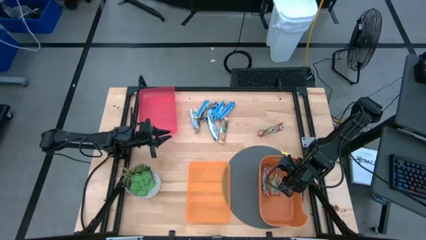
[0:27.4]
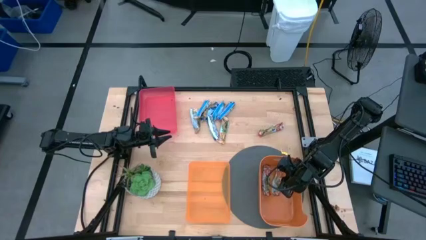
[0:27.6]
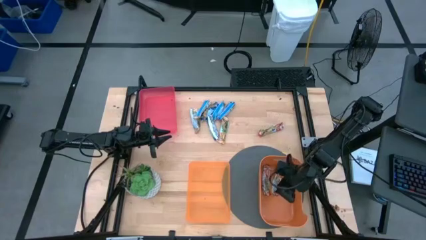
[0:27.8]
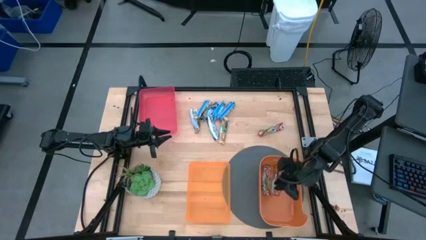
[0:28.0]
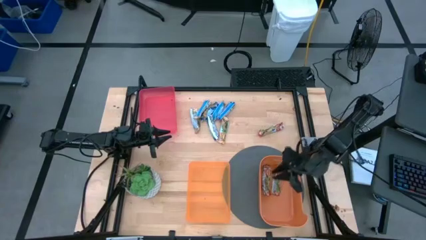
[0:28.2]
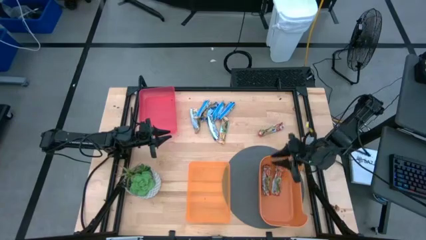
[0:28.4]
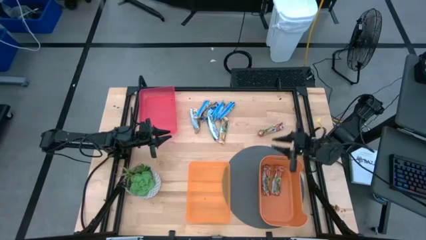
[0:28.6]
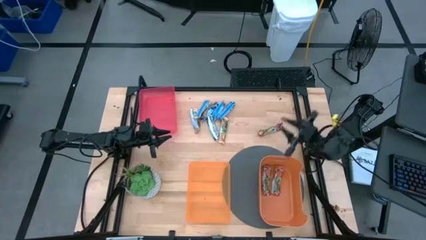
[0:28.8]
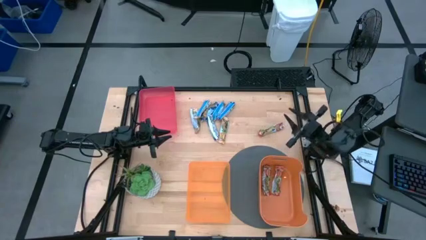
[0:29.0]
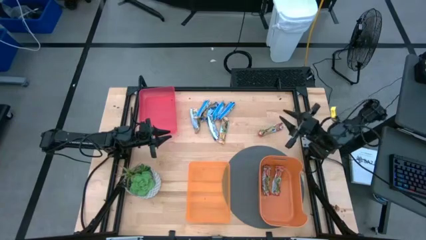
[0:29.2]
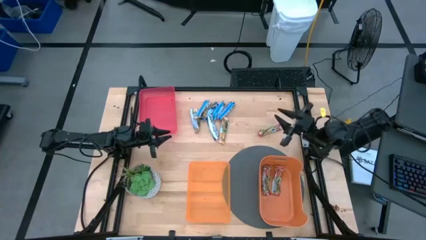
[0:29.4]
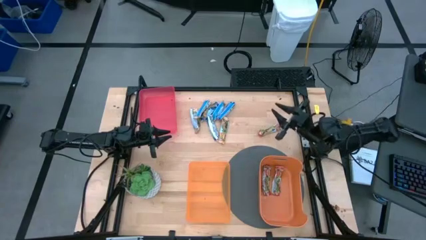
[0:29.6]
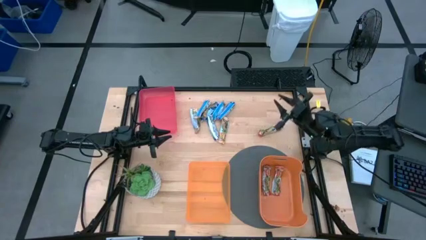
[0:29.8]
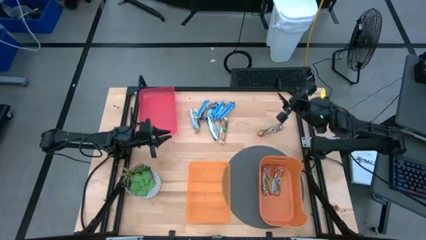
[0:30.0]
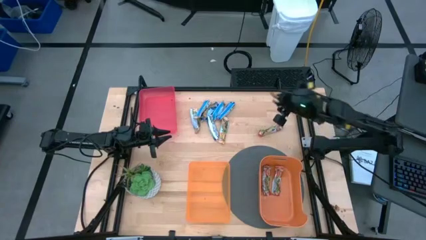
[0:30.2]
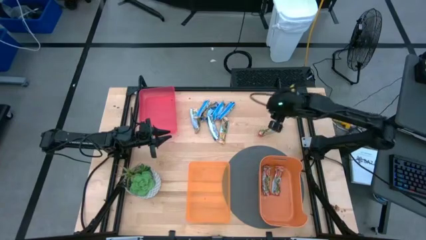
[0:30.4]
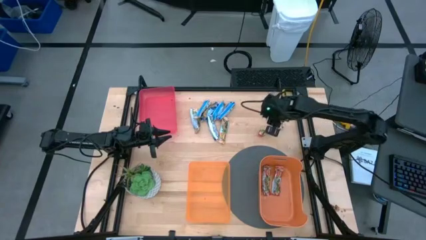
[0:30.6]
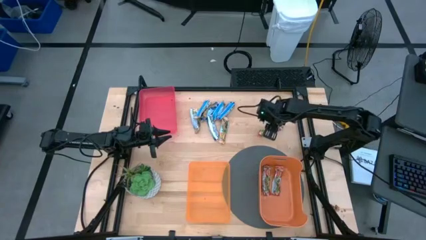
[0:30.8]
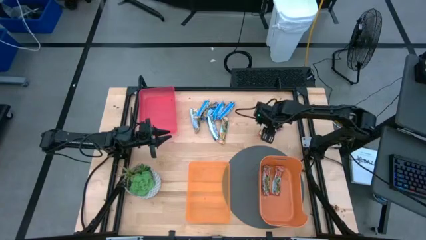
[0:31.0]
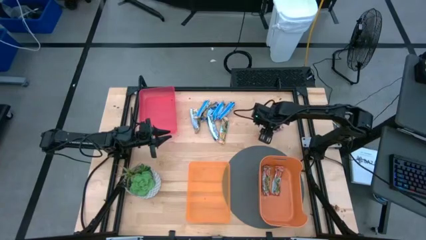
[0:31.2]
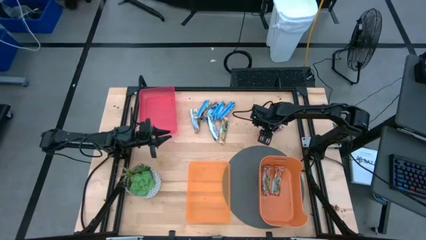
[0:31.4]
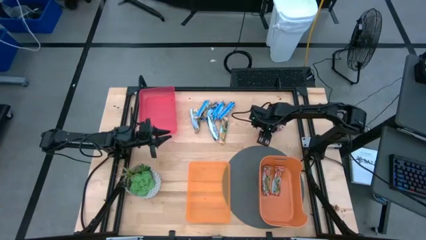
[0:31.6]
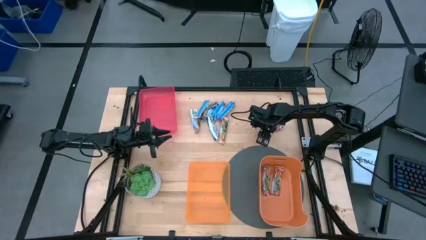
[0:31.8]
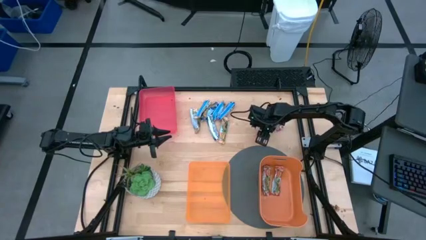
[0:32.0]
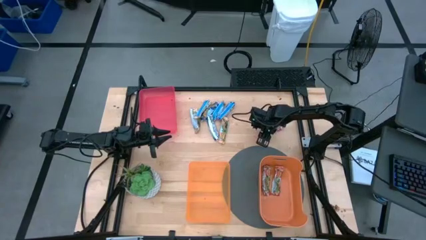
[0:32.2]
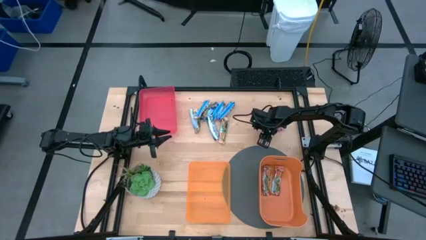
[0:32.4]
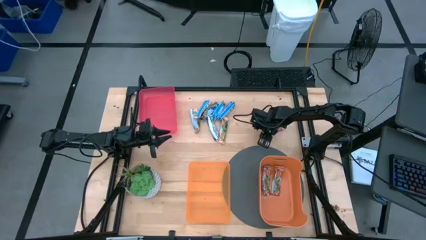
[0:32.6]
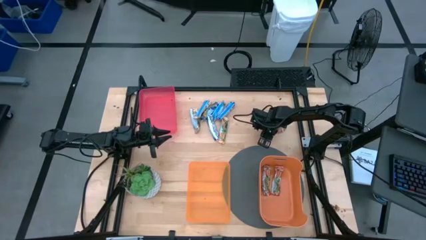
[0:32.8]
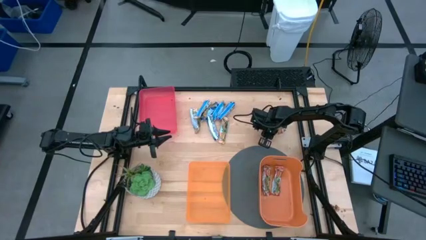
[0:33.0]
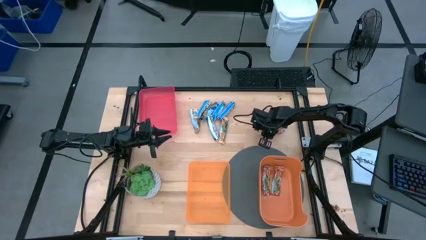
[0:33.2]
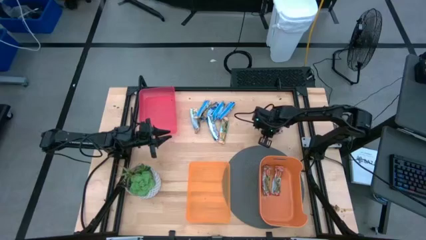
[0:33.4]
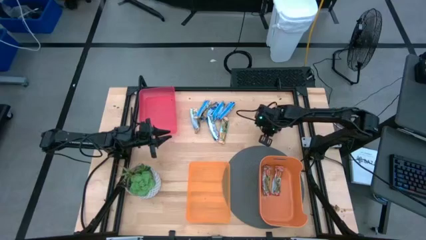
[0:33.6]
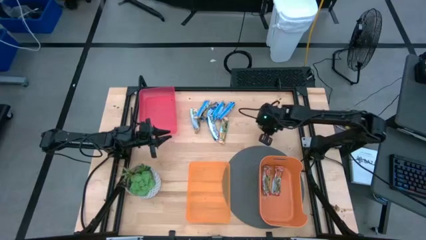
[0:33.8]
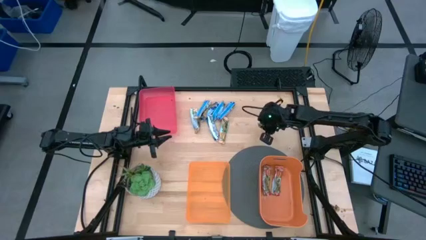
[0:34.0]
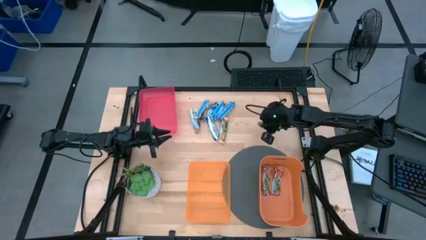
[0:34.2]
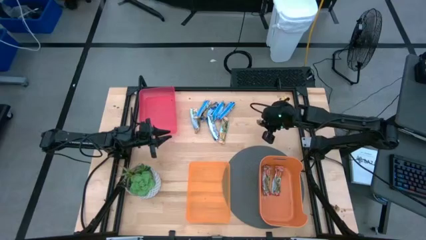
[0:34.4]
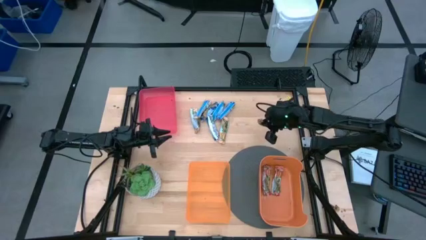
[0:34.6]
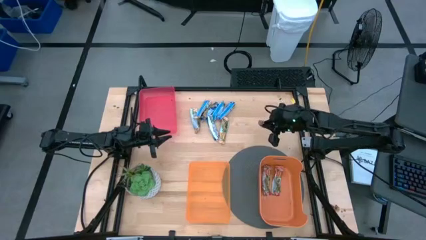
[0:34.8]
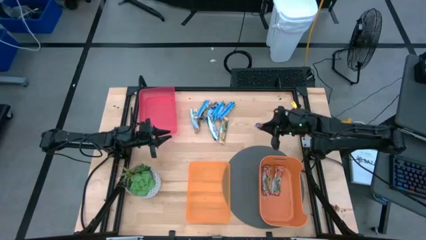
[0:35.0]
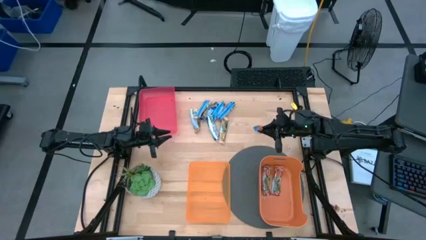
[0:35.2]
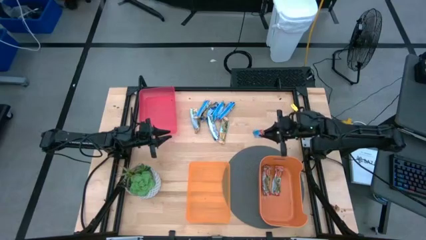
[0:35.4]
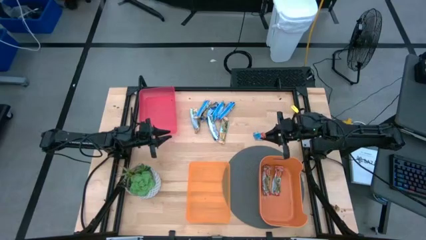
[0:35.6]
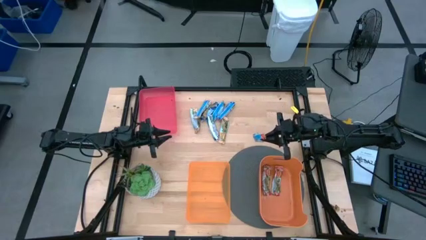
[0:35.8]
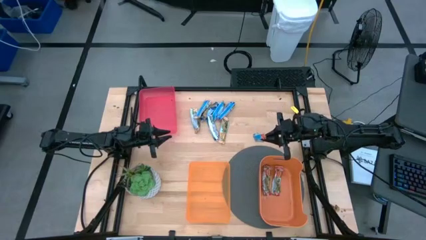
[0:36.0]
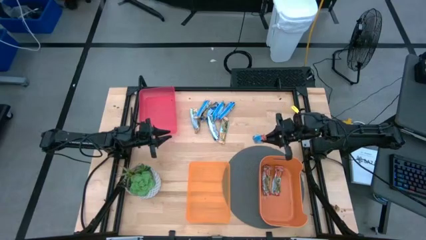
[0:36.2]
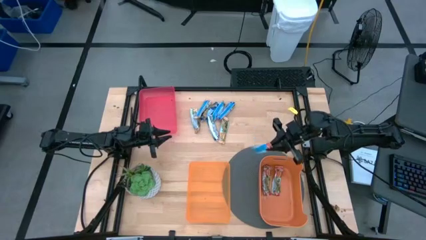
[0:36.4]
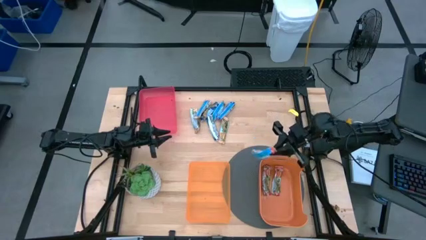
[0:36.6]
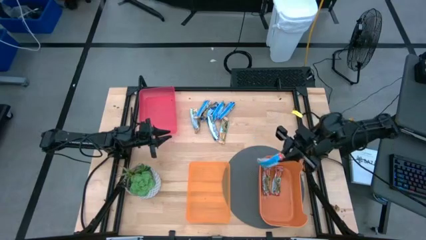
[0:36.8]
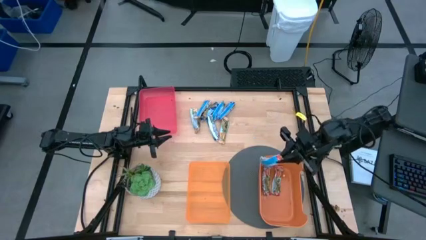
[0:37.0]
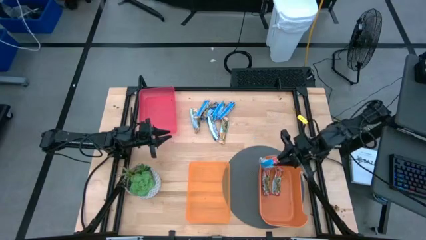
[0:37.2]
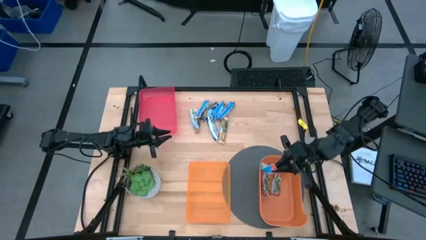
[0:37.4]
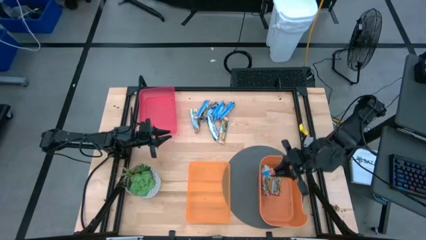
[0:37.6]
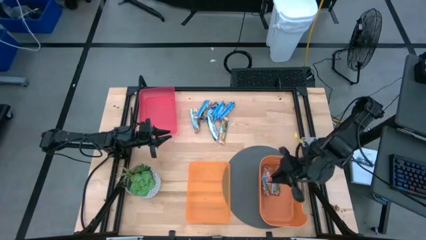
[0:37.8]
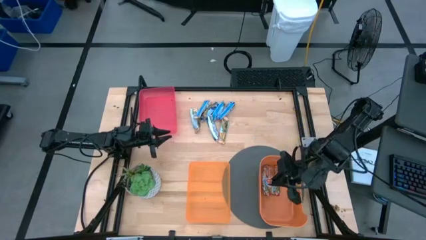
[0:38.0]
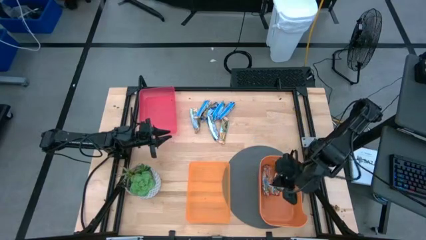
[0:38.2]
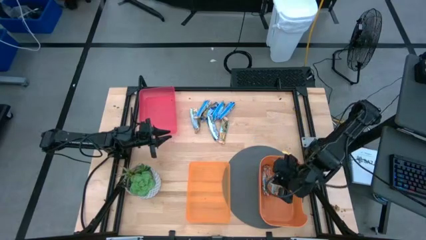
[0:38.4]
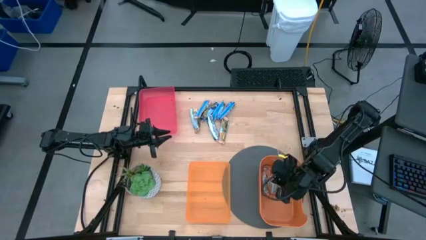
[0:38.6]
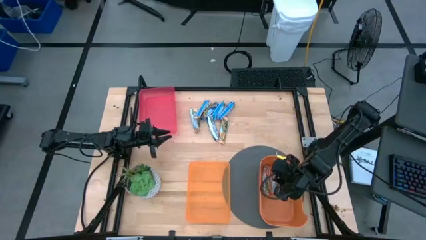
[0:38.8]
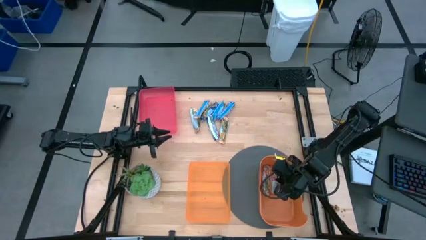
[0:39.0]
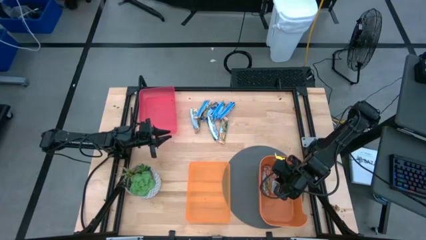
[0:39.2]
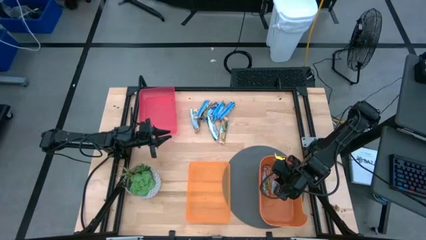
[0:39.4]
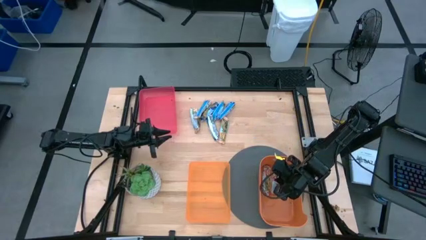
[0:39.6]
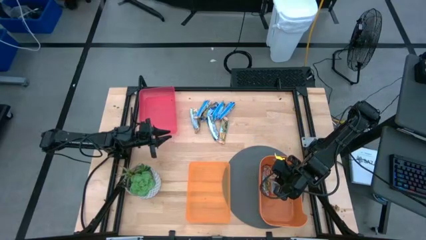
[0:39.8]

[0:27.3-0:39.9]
Task: Pick and place Granola Bars by type
Put the orange granola bar into the right orange bin

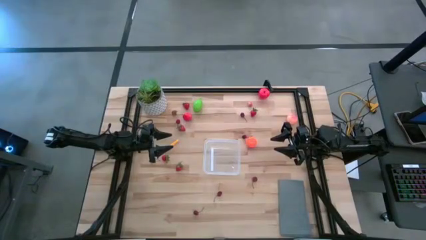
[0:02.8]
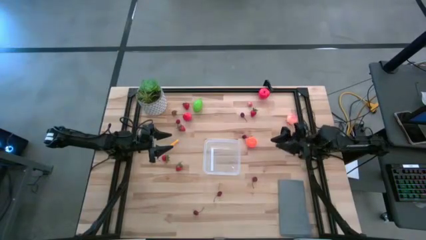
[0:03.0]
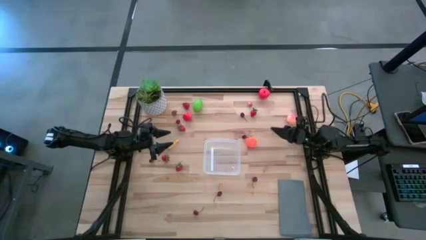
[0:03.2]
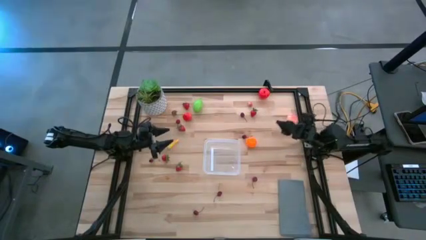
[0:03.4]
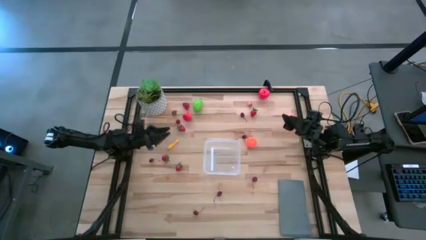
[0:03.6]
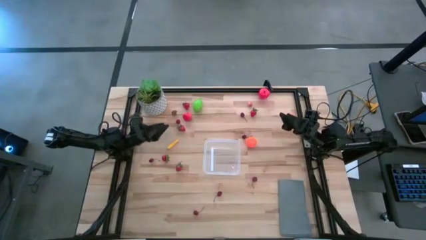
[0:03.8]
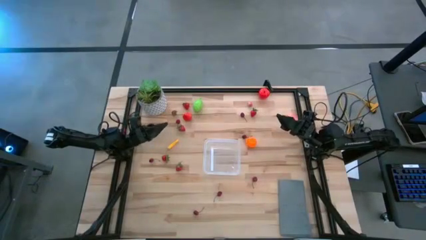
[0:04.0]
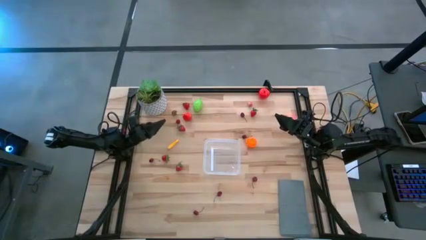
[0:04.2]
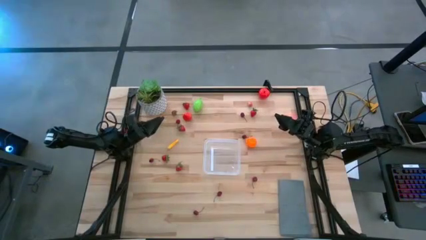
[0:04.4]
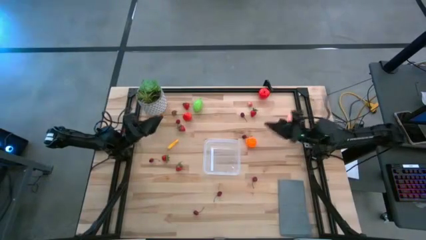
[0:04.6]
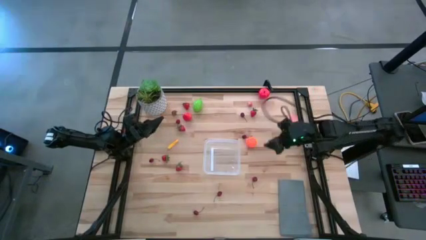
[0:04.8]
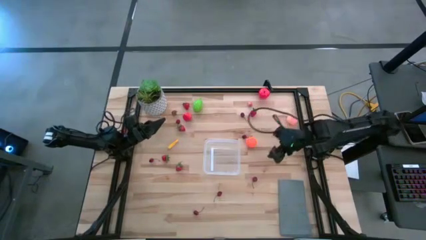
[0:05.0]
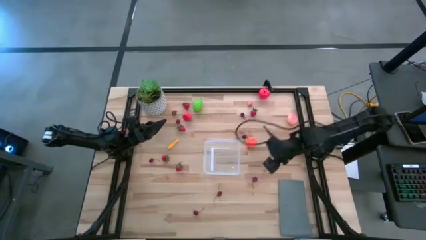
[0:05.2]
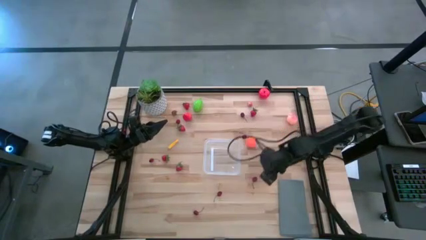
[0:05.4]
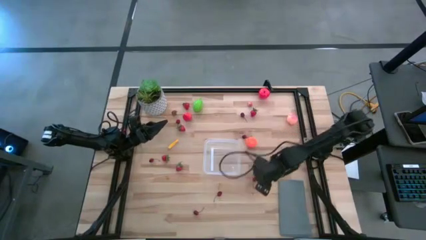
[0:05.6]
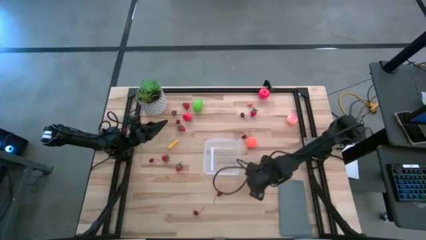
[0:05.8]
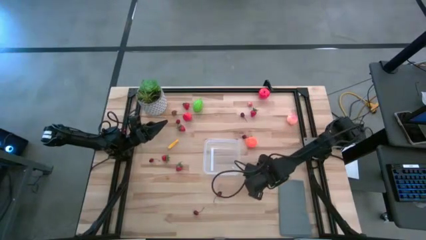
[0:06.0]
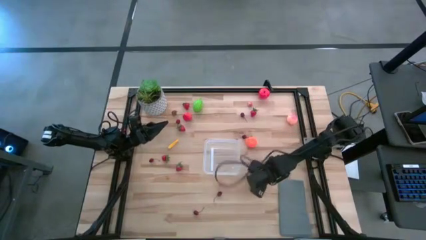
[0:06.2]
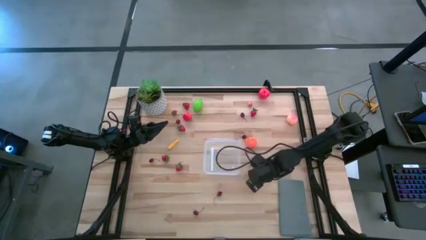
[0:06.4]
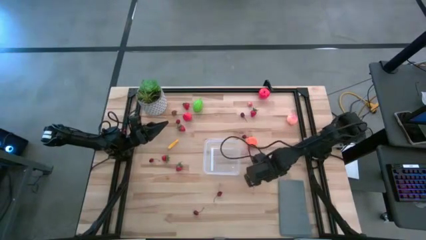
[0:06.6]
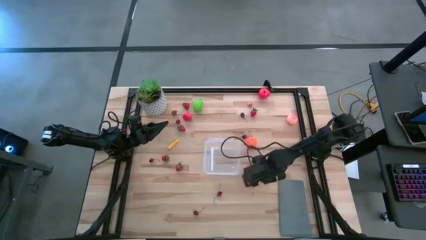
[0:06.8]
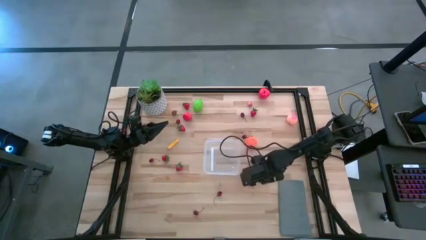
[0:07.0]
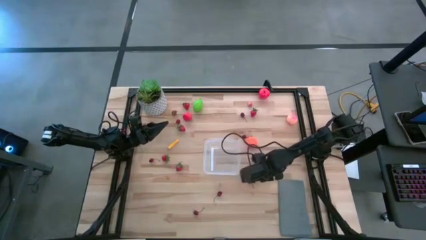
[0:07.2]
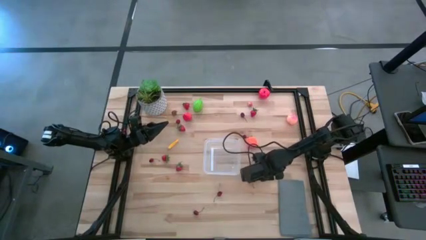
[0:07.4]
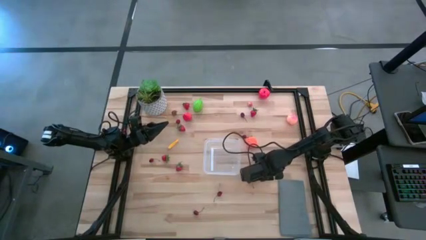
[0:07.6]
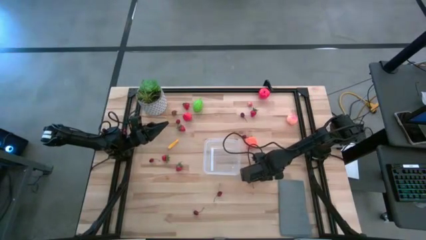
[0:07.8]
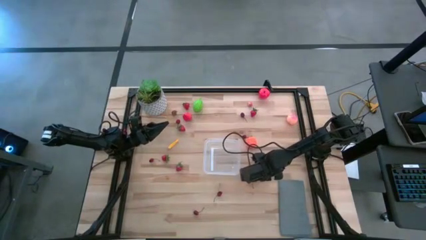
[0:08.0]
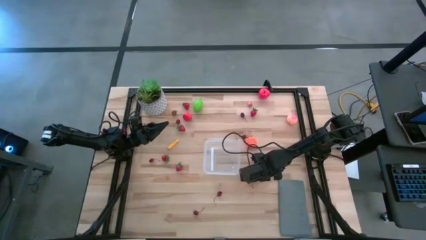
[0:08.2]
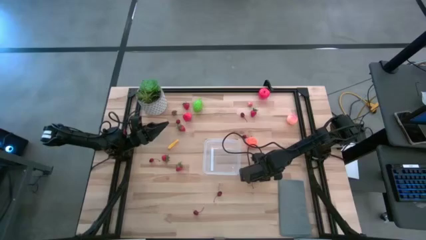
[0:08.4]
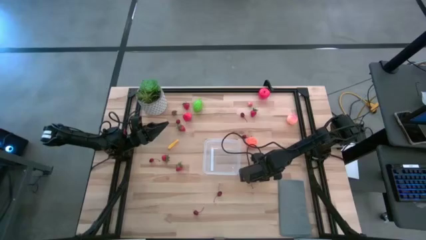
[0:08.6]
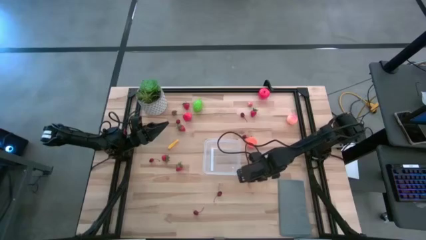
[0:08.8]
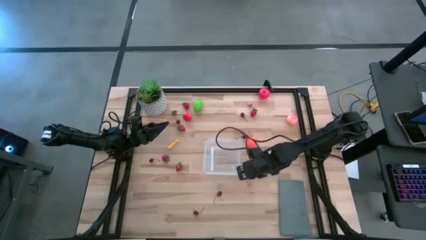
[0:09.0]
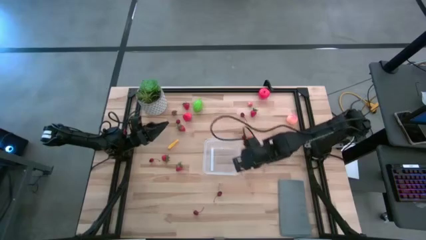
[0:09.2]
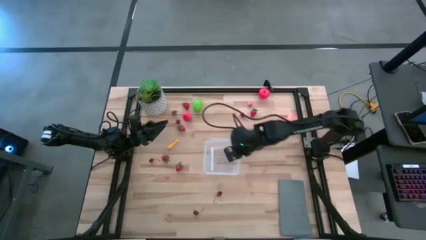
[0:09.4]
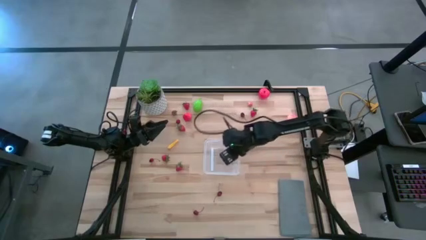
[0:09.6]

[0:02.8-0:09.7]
Task: Pick and placing Produce into tupperware
Put the red cherry into the transparent container
